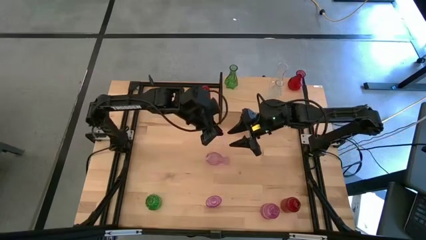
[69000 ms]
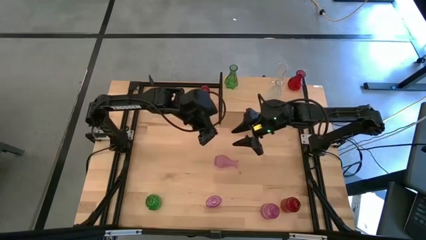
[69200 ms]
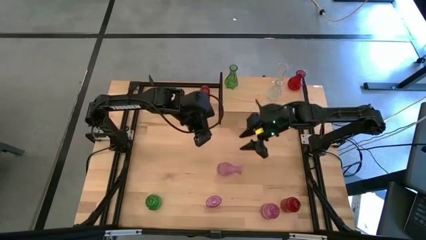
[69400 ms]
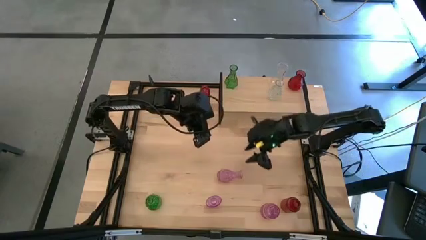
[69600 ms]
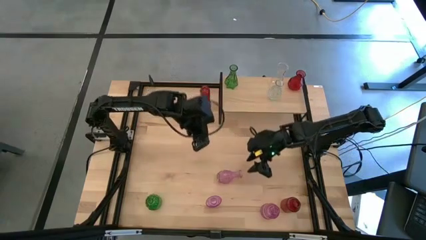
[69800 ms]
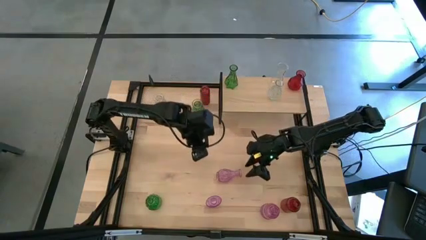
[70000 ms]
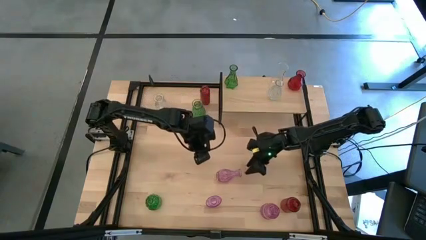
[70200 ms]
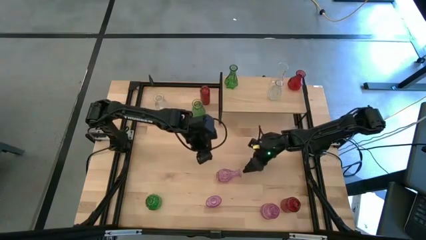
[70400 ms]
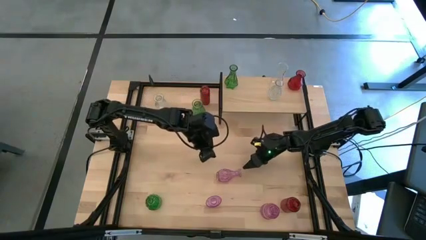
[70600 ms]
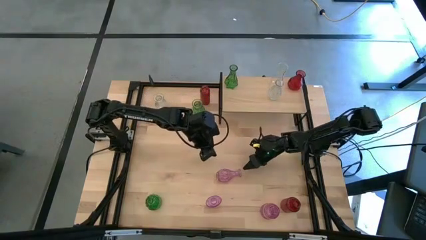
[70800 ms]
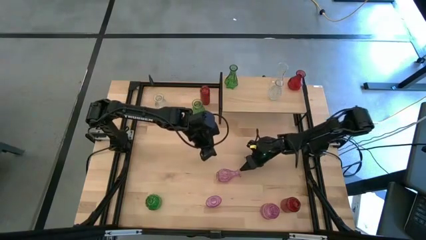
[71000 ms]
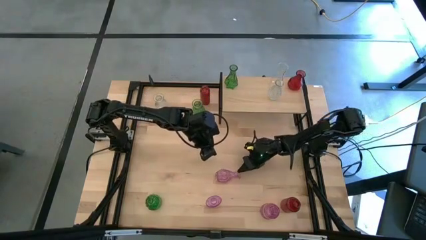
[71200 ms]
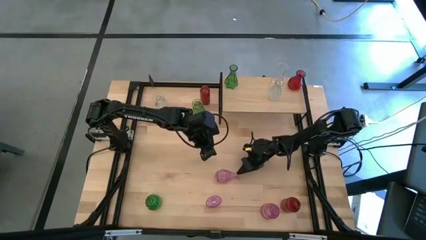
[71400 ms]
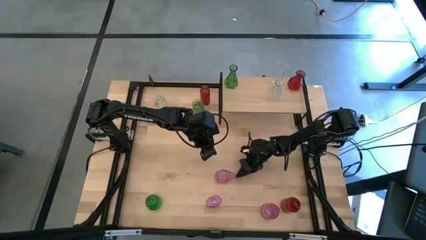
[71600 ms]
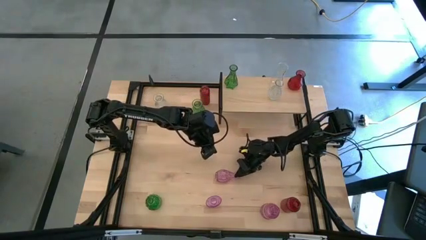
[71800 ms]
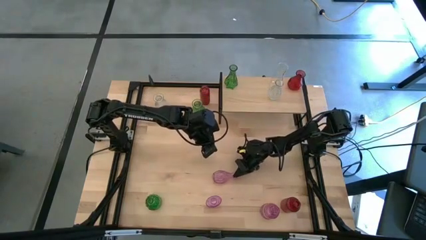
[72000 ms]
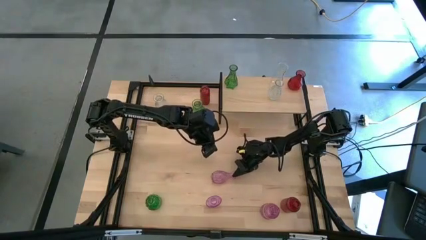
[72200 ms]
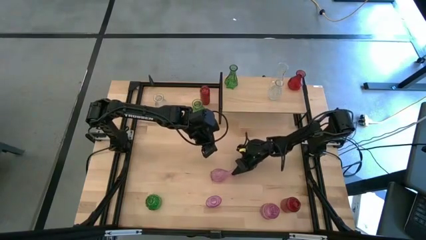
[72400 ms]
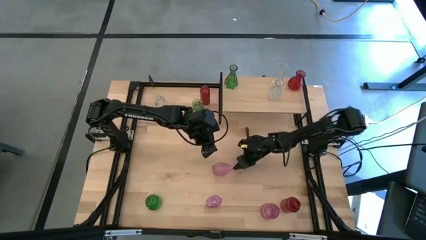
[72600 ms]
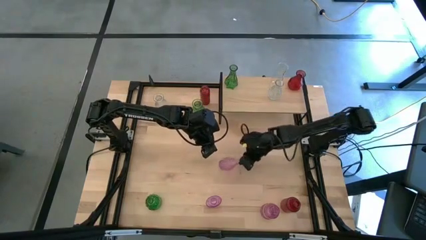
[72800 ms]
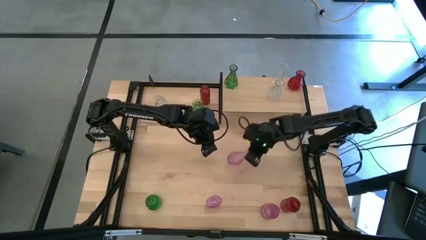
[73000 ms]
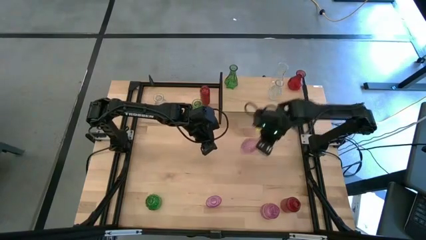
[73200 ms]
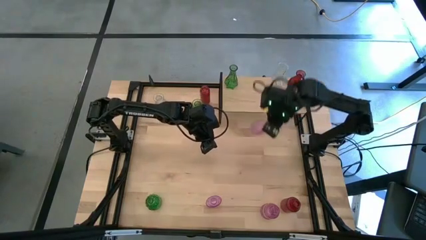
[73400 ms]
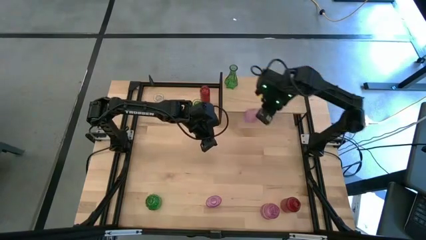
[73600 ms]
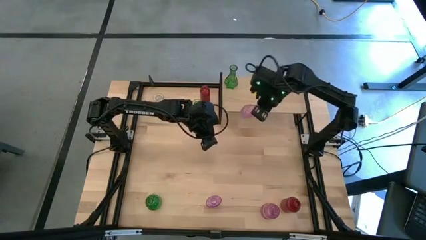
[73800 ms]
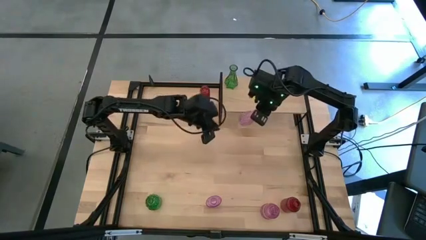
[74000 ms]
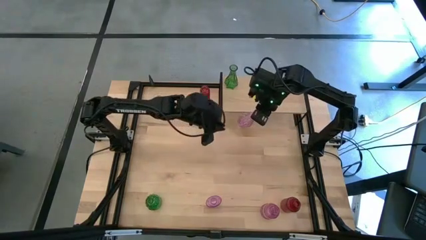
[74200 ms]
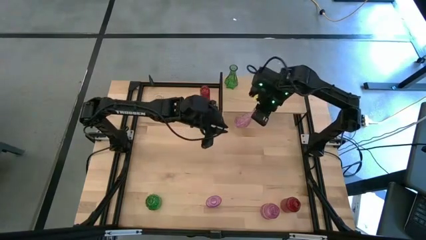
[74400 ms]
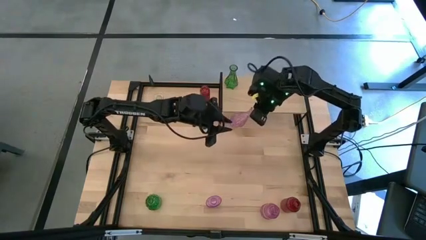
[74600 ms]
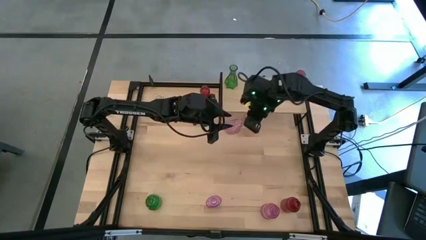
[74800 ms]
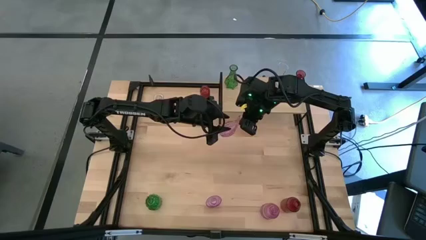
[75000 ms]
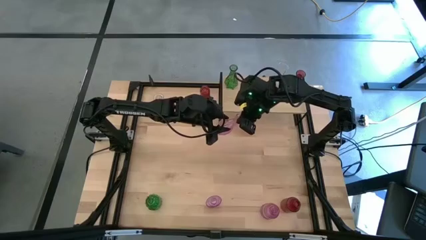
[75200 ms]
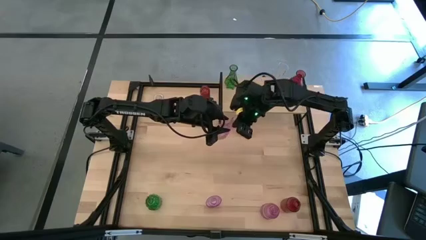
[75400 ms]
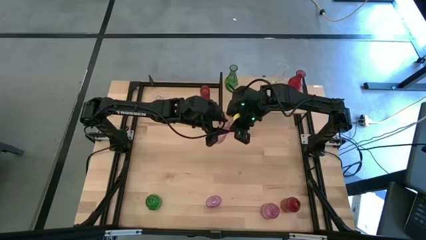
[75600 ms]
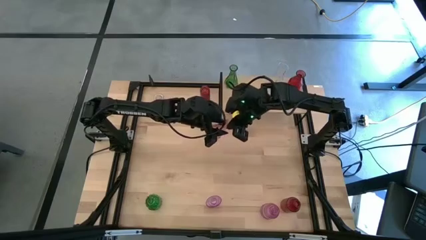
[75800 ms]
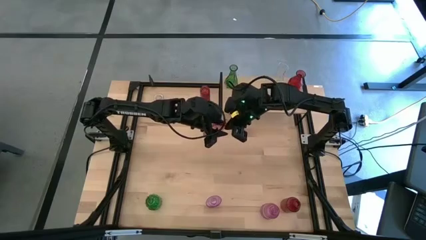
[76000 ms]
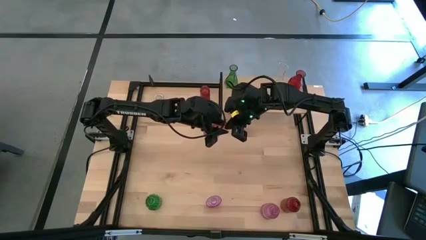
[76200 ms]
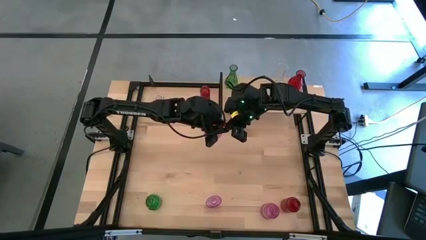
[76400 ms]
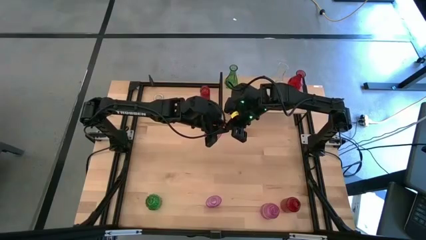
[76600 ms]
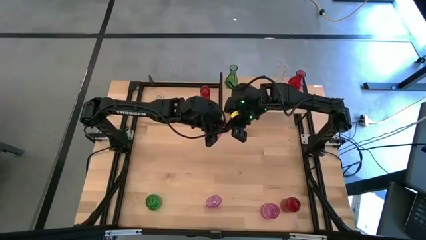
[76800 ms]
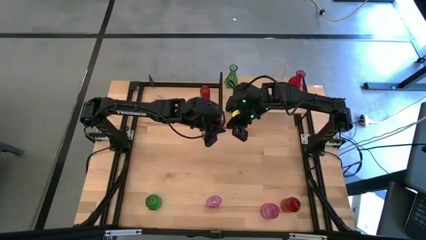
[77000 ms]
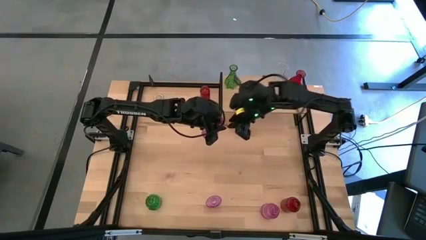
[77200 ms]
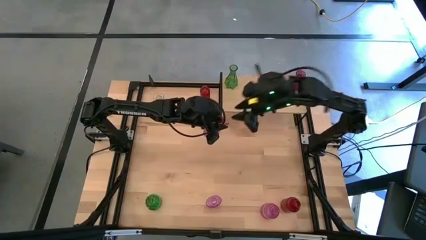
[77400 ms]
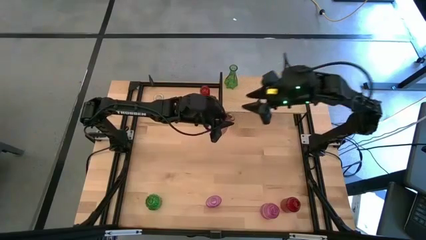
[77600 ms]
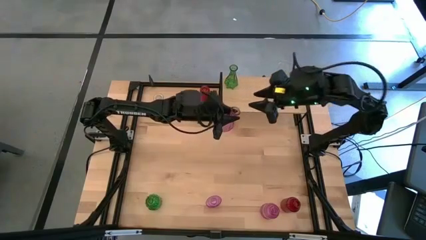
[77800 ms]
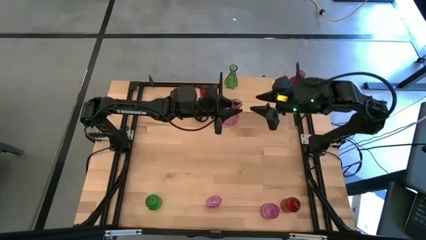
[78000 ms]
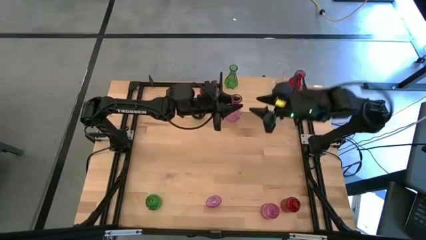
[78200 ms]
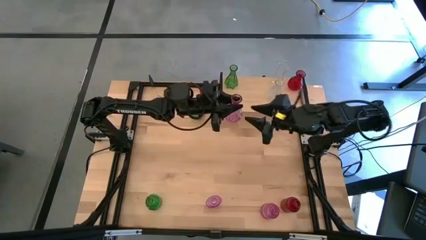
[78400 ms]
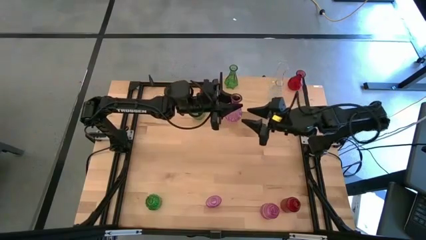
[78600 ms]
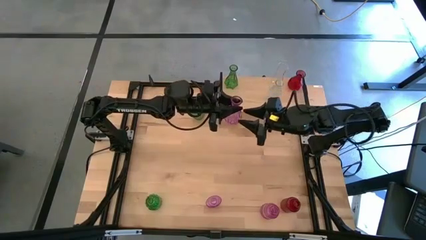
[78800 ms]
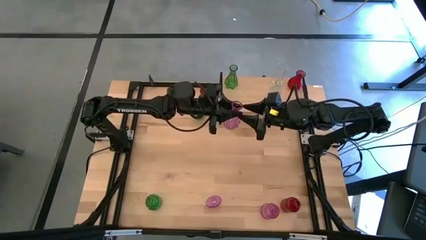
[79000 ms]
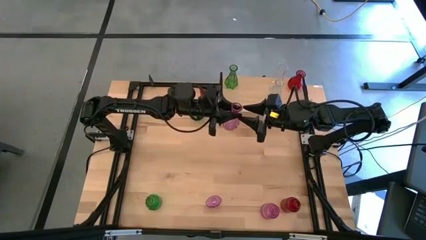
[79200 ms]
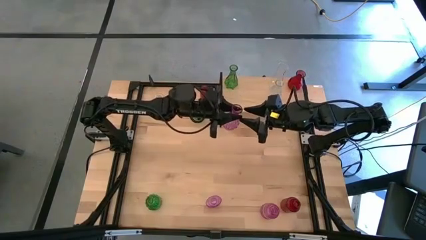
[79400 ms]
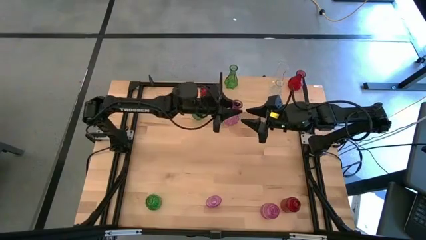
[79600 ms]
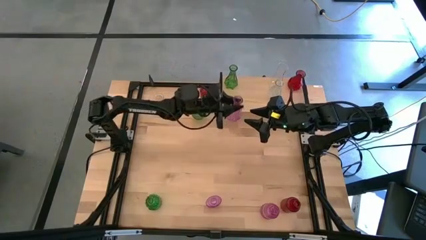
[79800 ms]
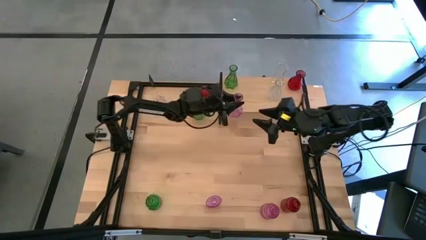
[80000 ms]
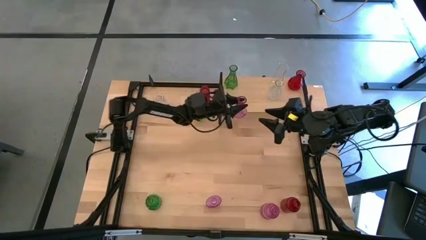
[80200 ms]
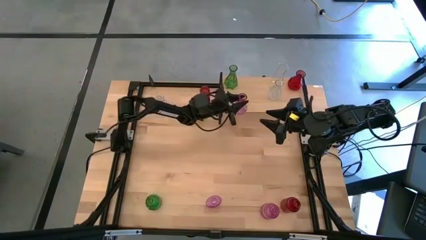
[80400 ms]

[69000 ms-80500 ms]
Task: sort vases onto shelf
Put the top pink vase on the shelf

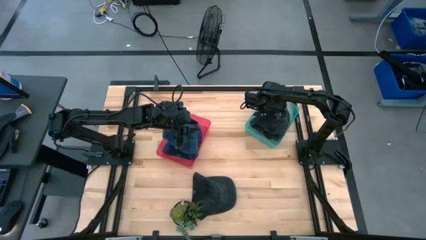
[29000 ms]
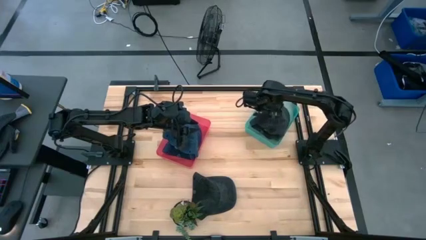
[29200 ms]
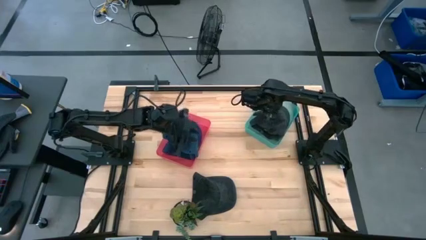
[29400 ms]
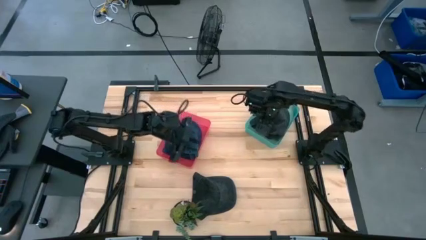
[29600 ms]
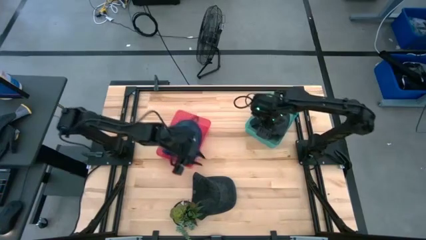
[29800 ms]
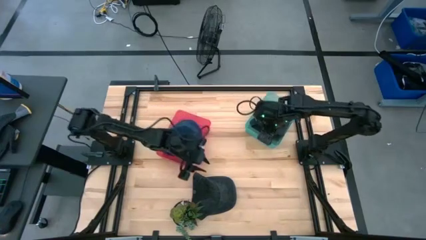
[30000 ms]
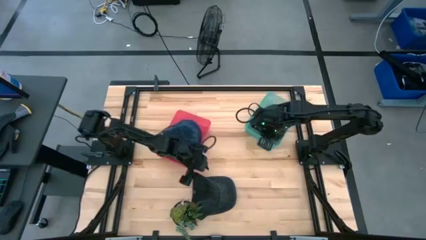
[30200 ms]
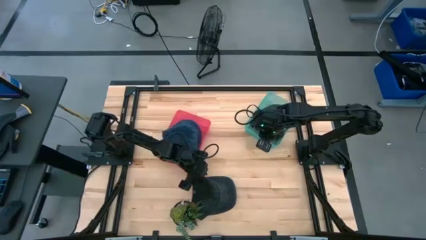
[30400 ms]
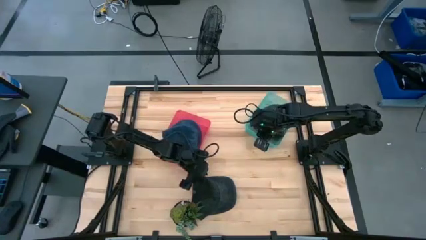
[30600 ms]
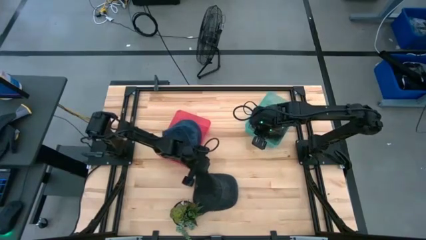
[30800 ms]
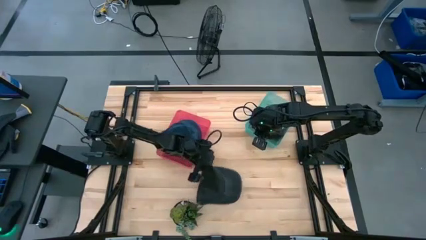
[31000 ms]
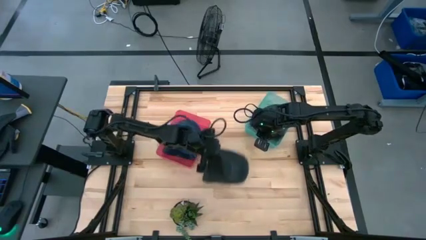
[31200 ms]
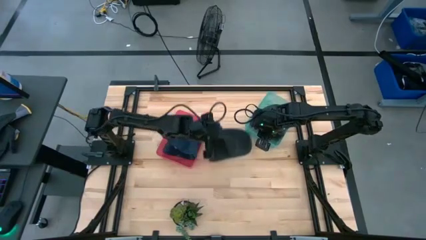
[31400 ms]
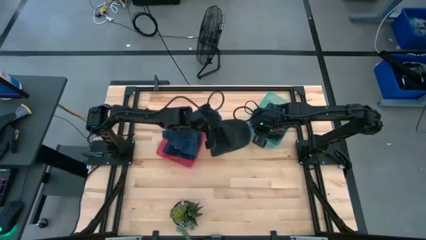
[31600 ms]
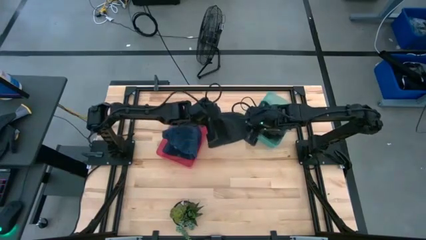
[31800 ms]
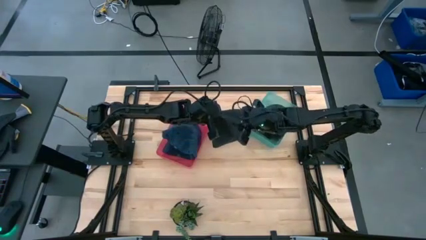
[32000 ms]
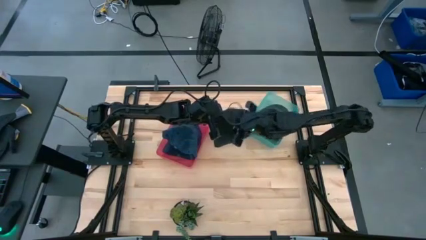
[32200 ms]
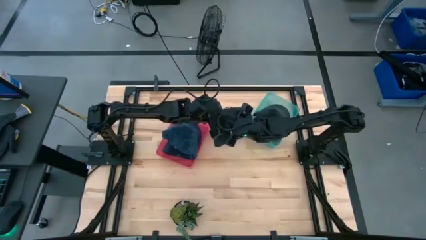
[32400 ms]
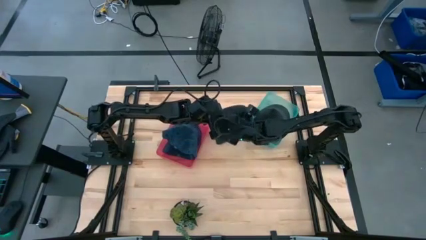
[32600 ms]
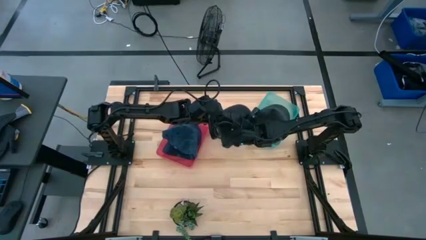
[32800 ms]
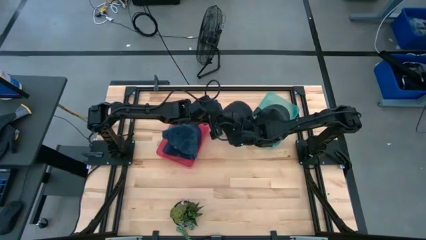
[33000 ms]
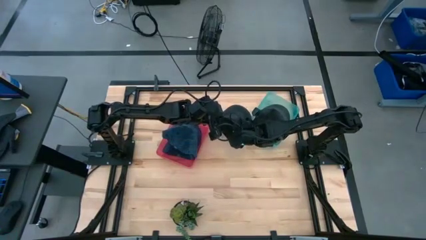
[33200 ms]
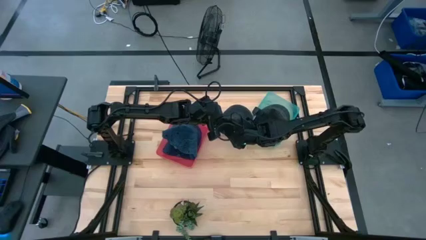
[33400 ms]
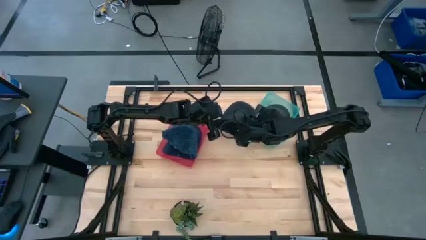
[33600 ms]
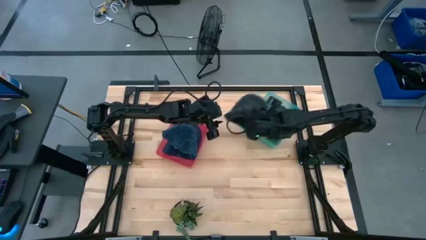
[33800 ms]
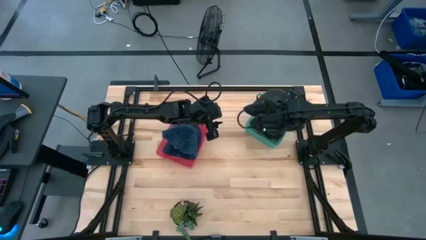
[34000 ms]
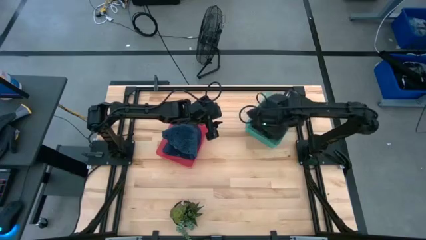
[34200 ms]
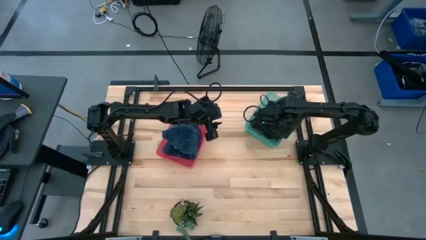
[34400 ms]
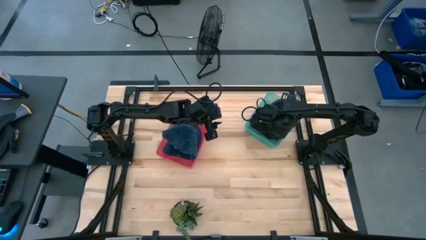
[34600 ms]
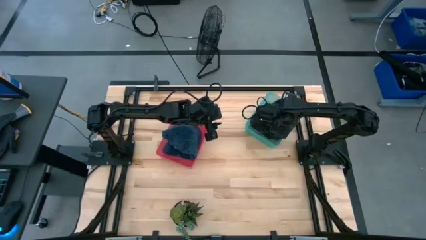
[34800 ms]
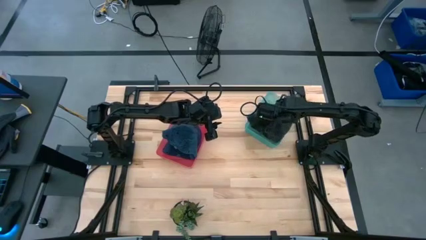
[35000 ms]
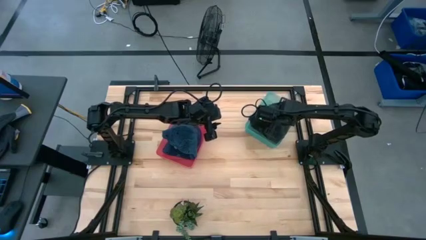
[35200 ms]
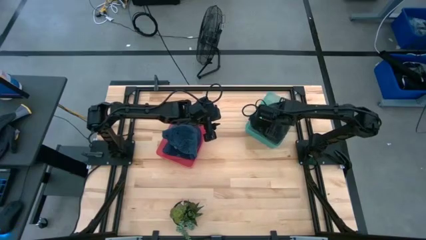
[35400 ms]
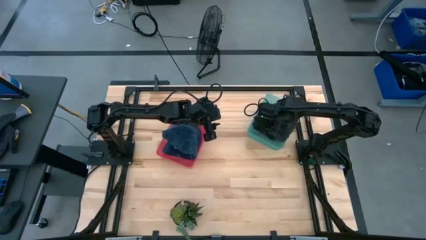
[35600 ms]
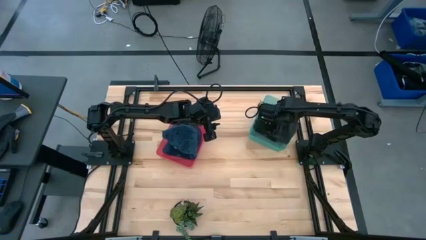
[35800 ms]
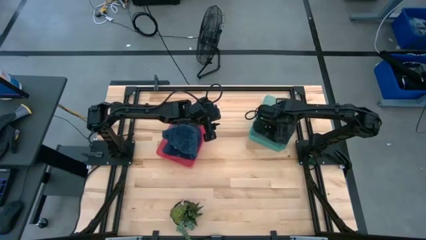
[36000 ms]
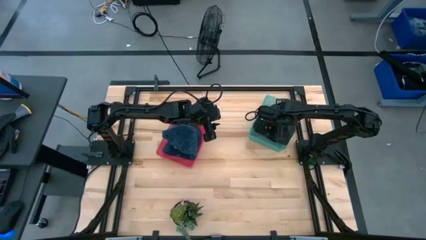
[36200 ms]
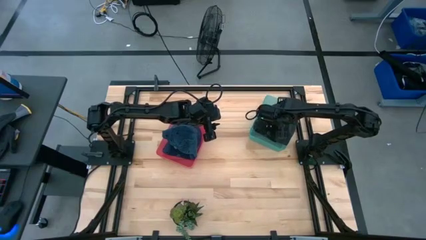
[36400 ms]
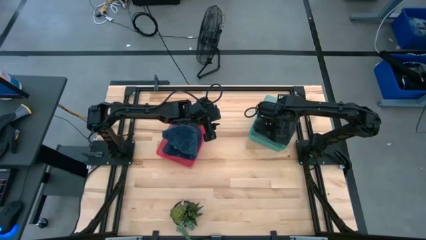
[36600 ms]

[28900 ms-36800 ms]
Task: Pick & Place hat
Put the black cap into the green bin
